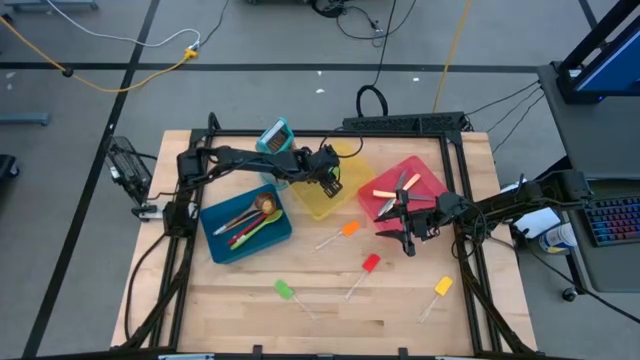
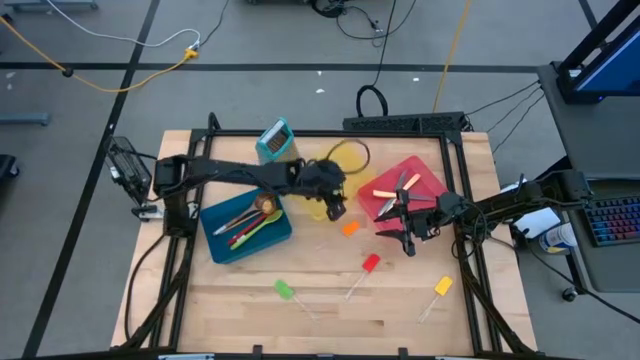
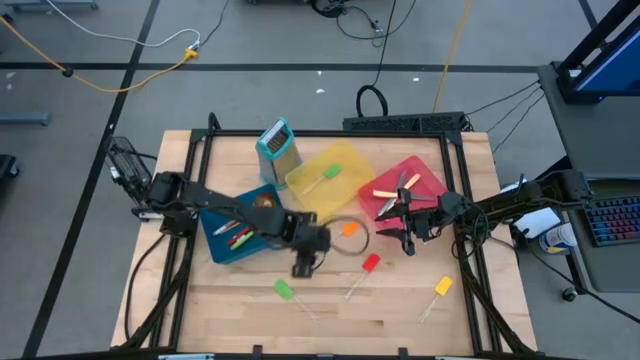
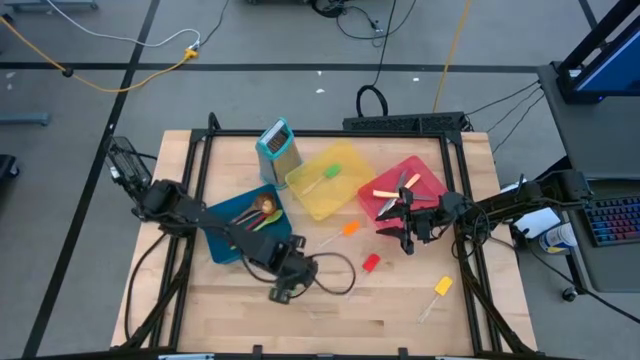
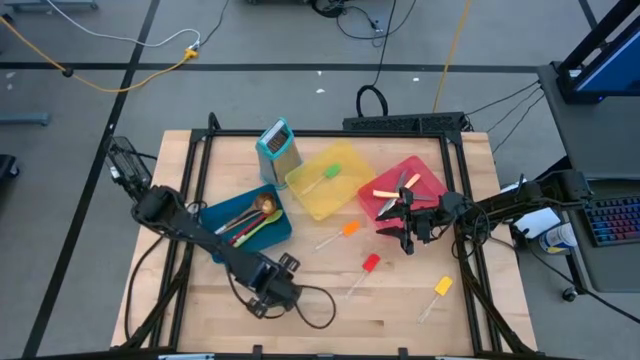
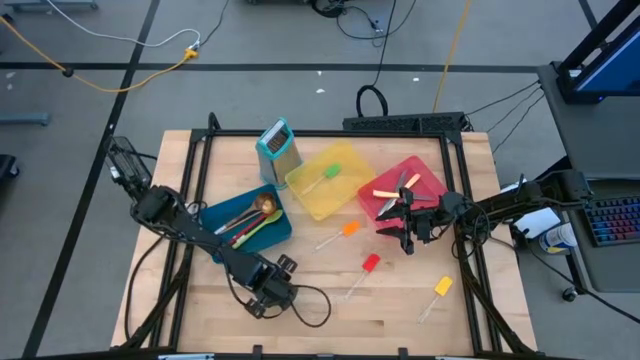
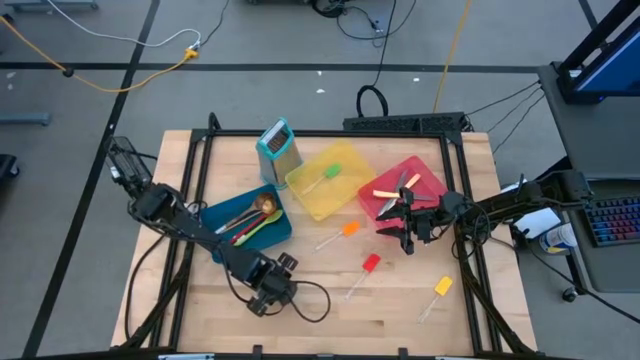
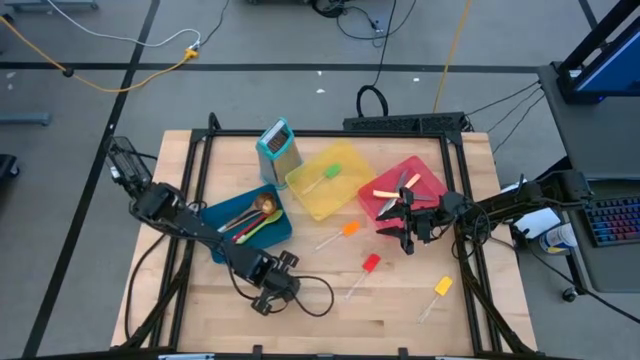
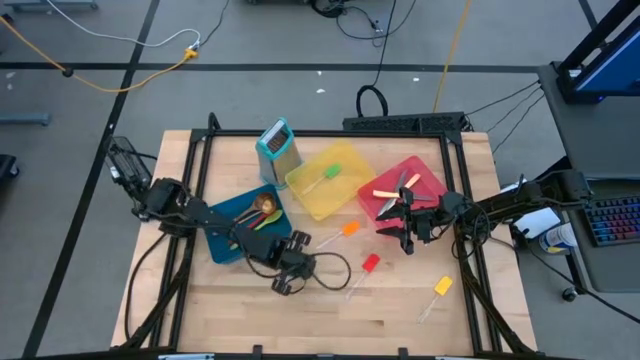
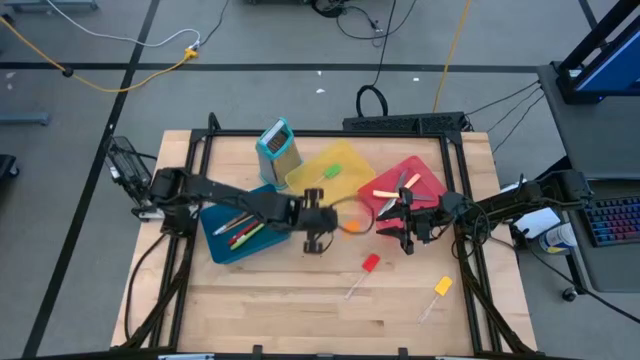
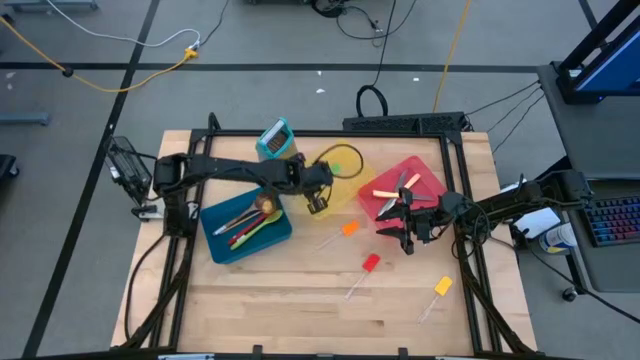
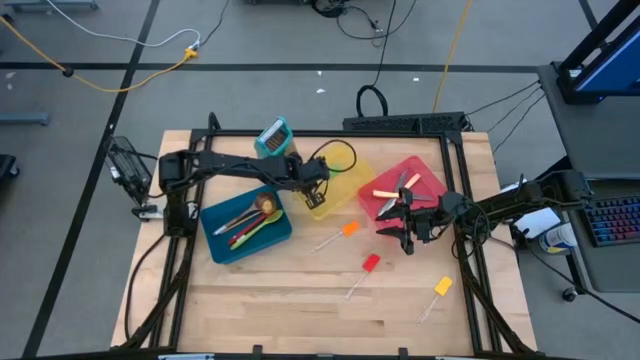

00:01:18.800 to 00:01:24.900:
Task: Pick & Place Kitchen Items
Put the green spatula into the yellow bin

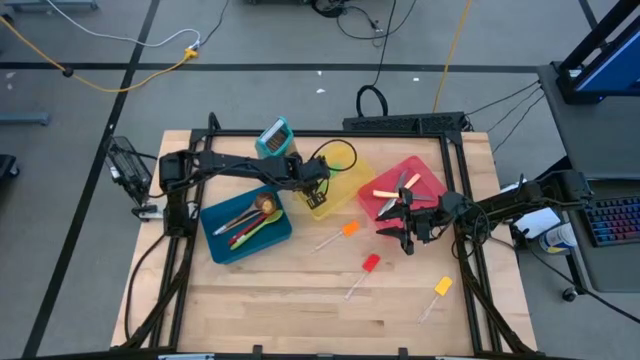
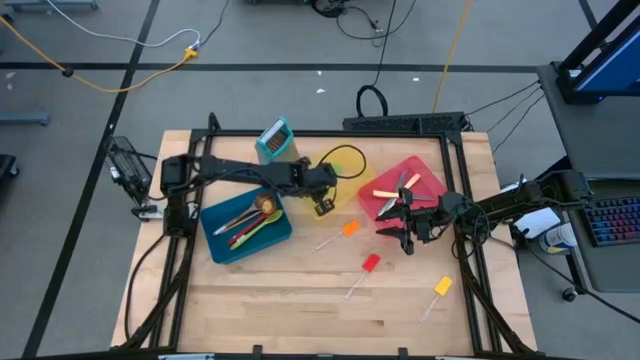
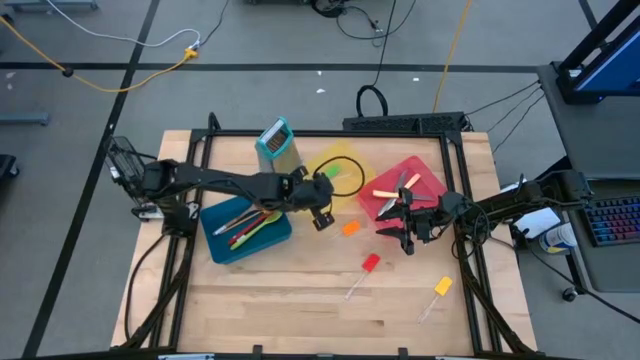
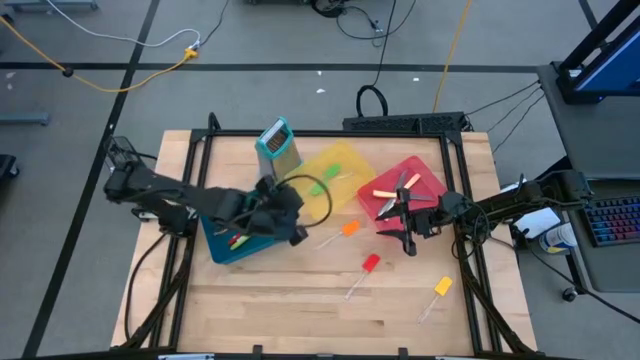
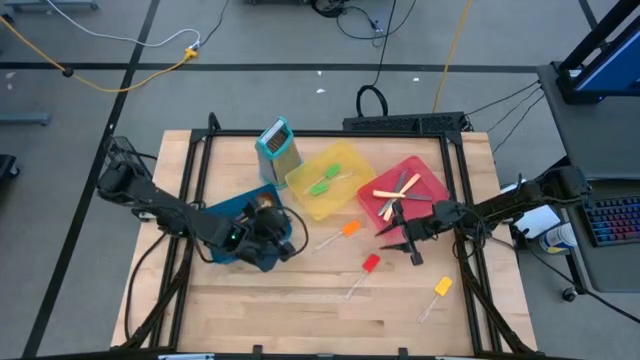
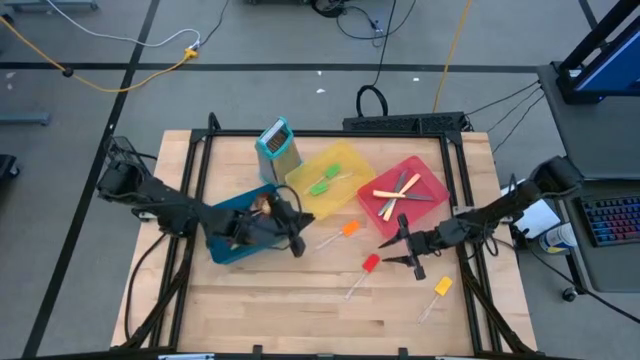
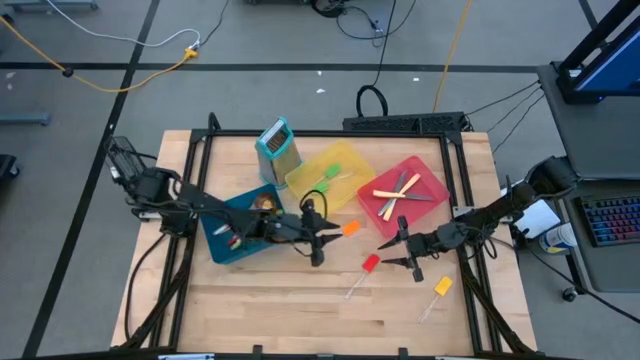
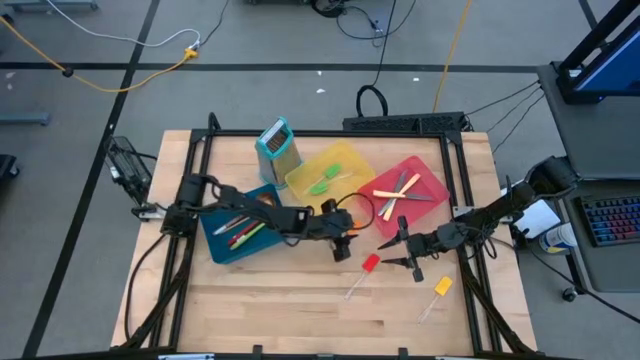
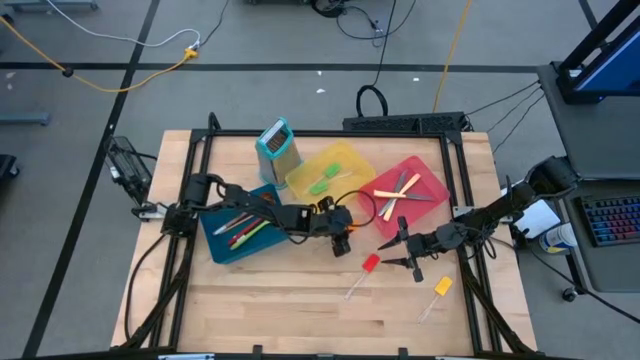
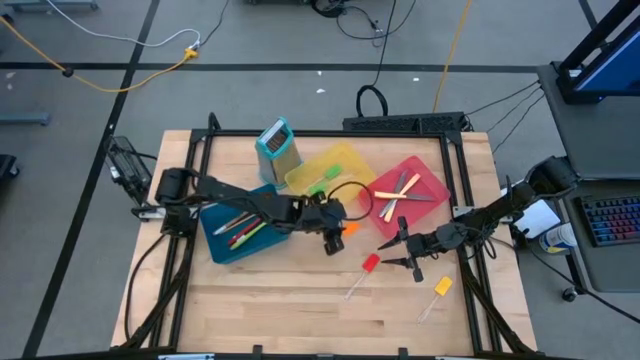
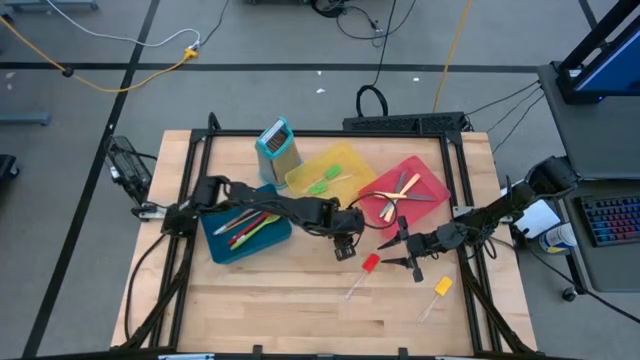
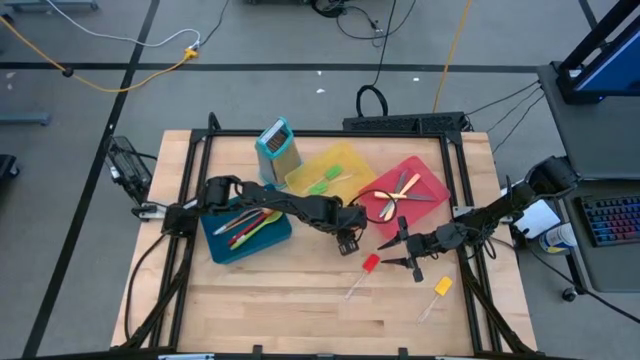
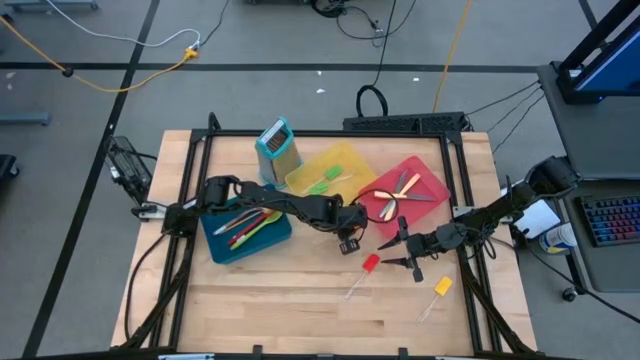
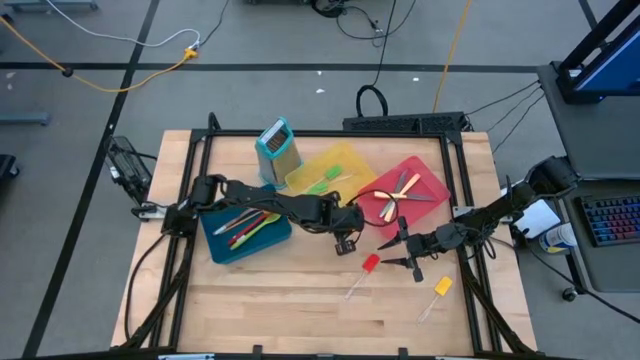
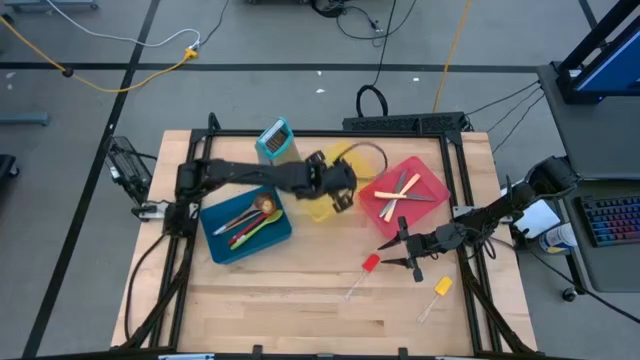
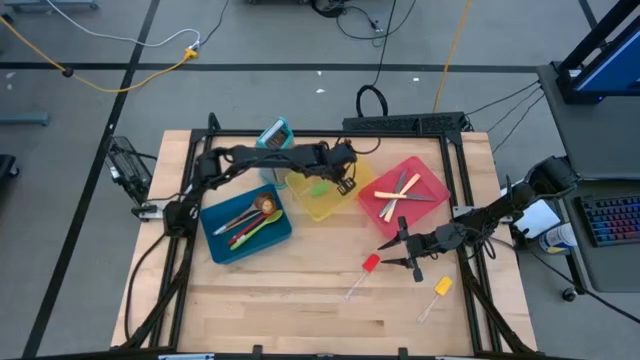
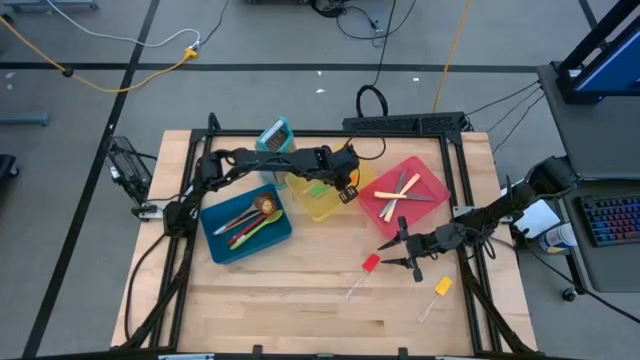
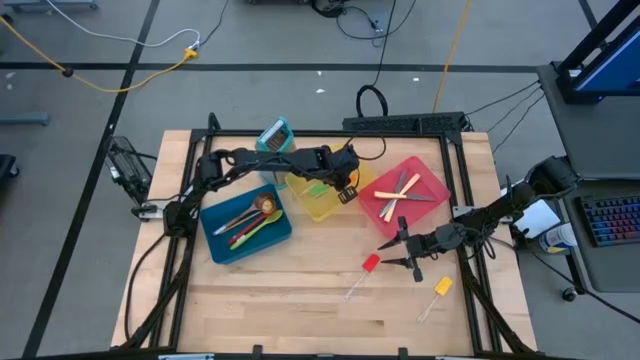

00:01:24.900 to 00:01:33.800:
Put the orange spatula into the yellow bin

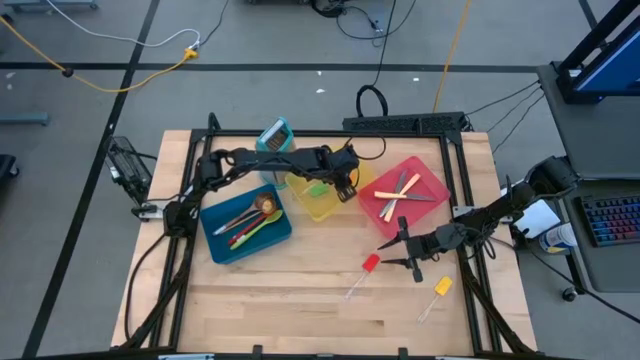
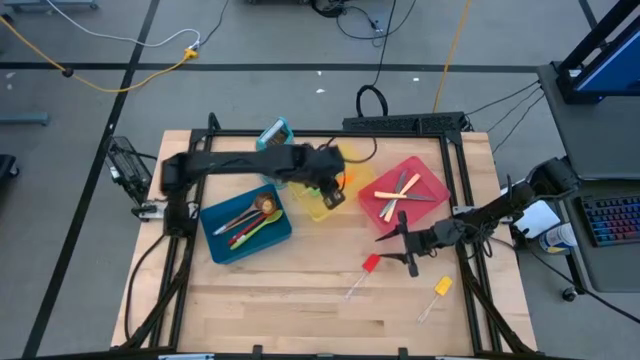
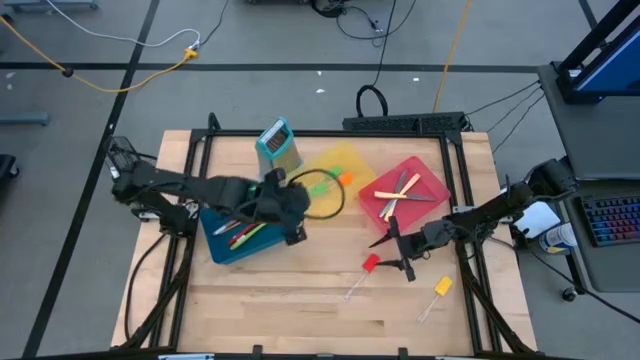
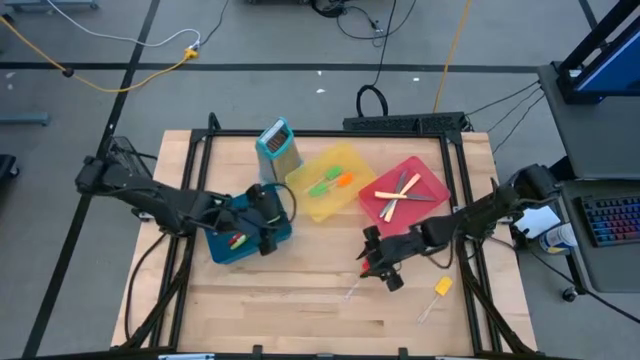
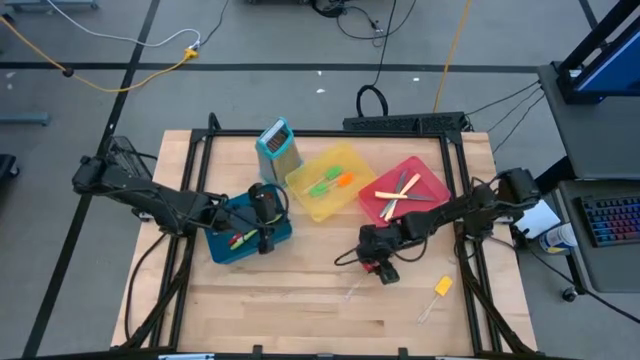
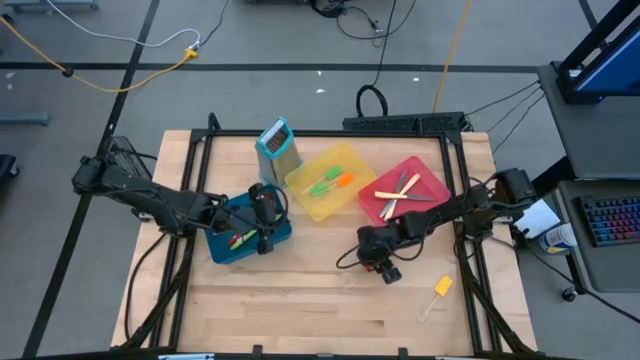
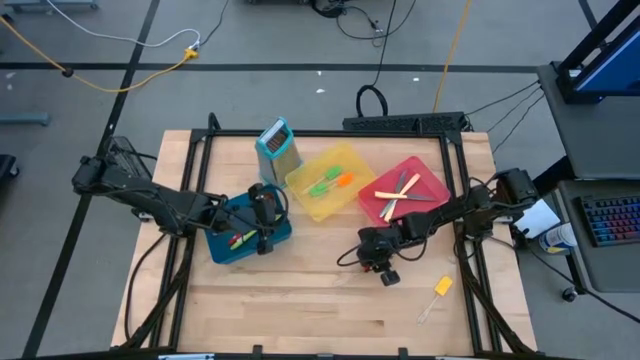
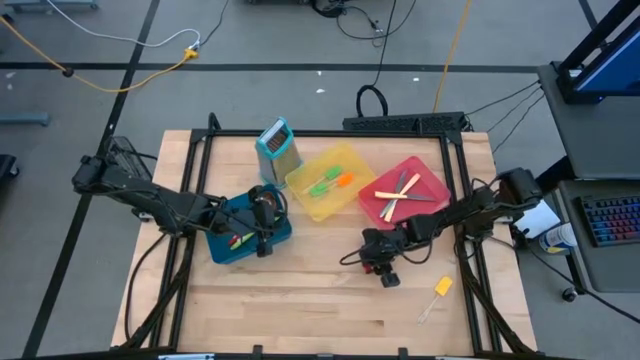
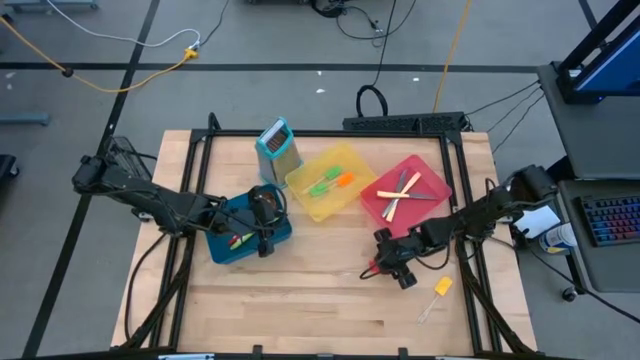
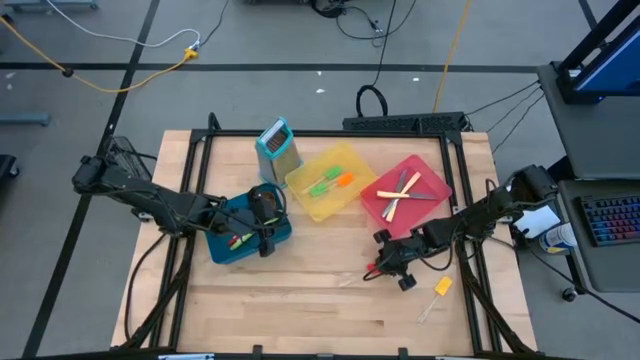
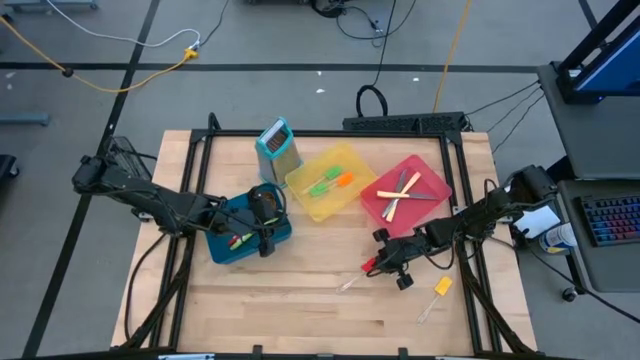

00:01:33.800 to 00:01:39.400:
Put the red spatula into the yellow bin

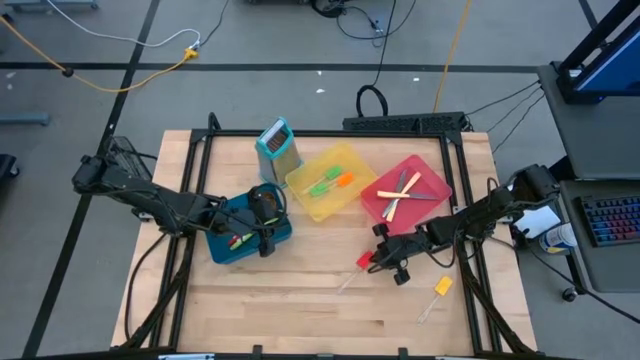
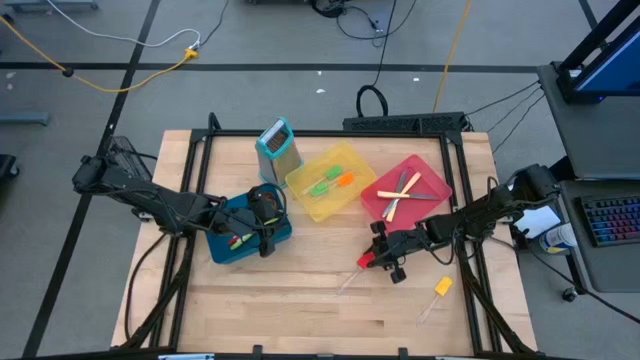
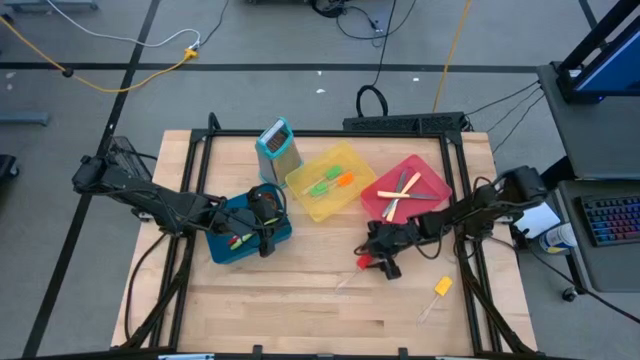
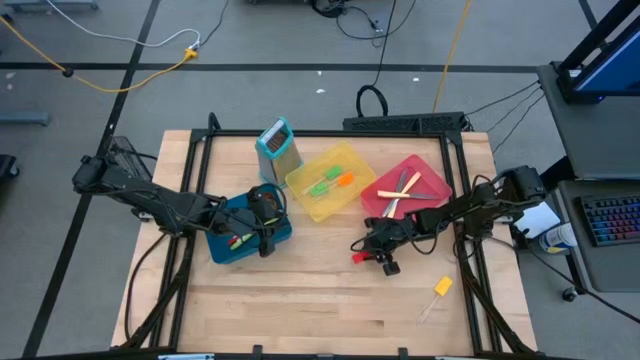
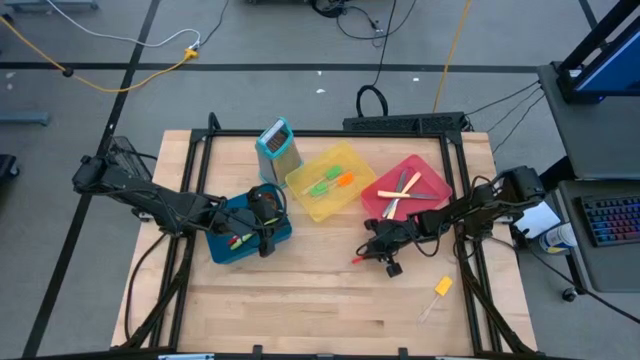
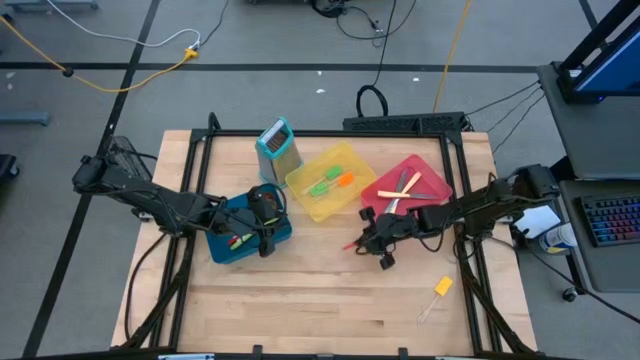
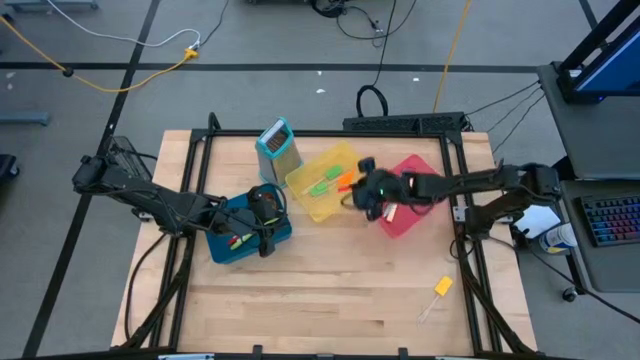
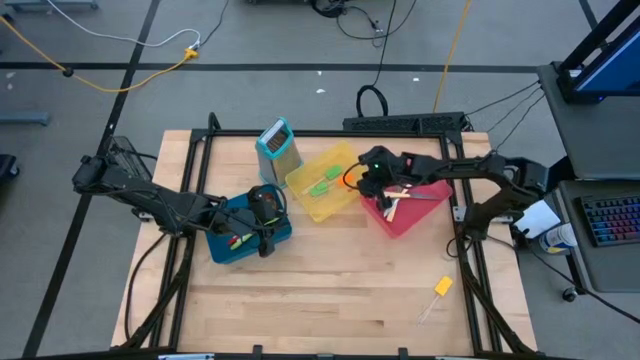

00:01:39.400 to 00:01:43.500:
Put the red spatula into the yellow bin
